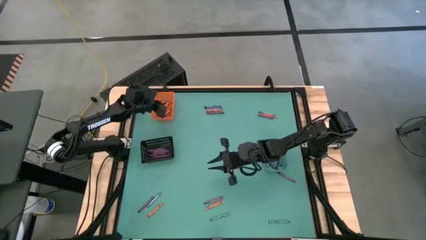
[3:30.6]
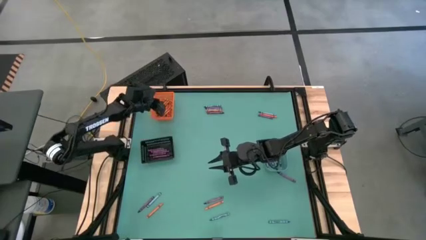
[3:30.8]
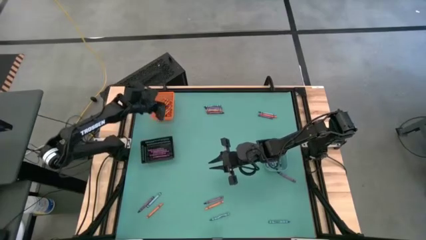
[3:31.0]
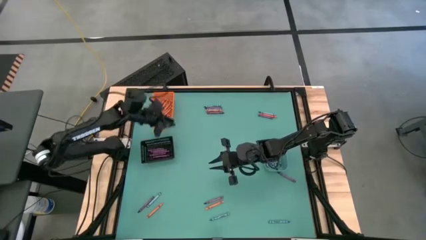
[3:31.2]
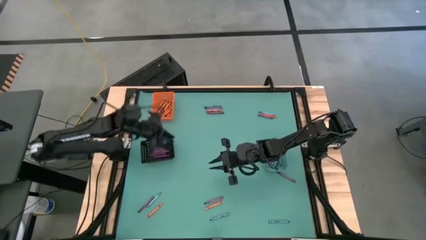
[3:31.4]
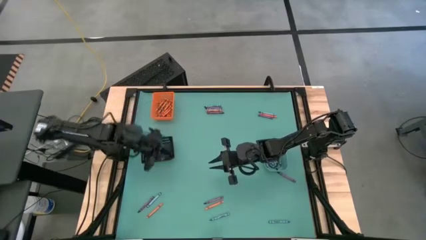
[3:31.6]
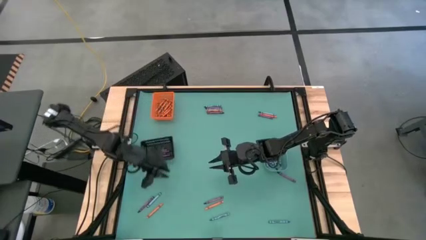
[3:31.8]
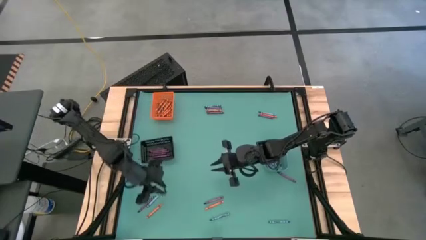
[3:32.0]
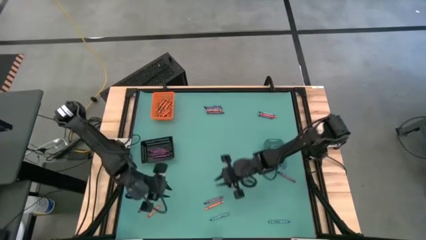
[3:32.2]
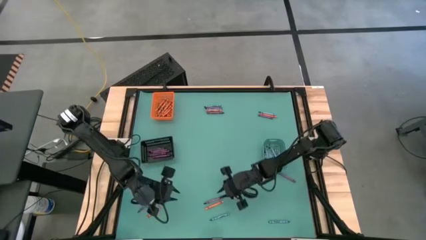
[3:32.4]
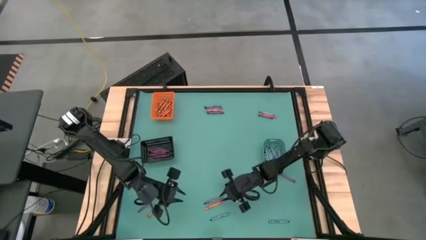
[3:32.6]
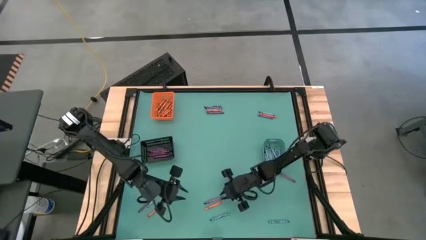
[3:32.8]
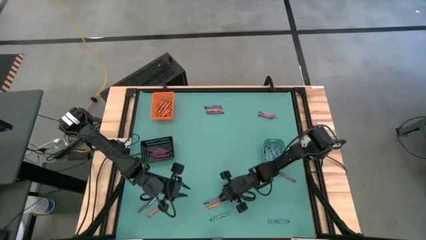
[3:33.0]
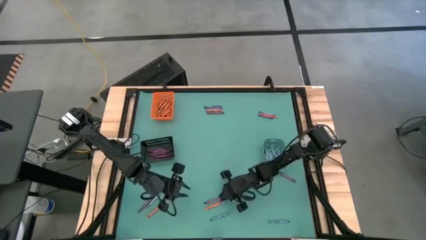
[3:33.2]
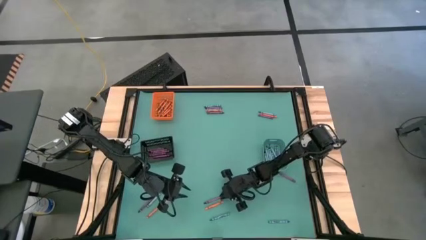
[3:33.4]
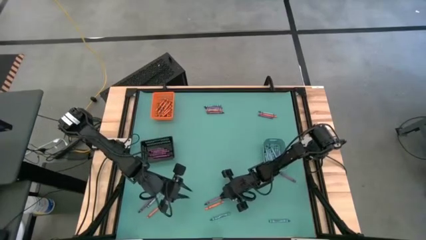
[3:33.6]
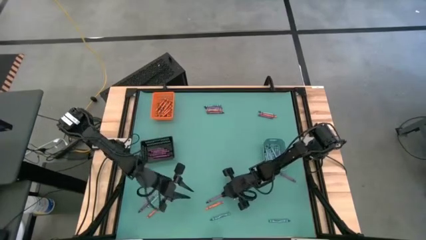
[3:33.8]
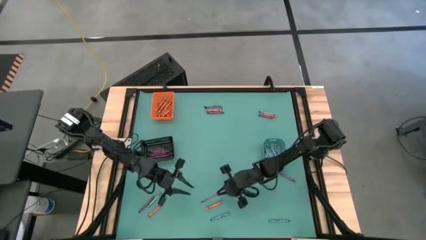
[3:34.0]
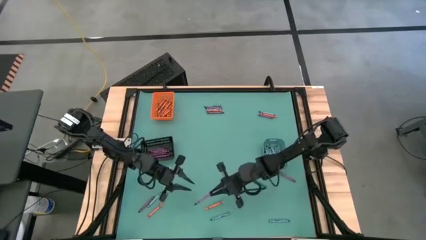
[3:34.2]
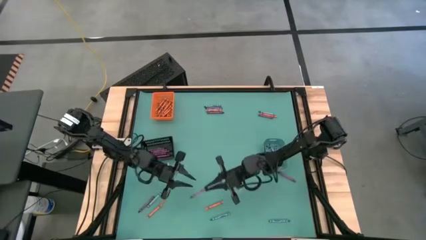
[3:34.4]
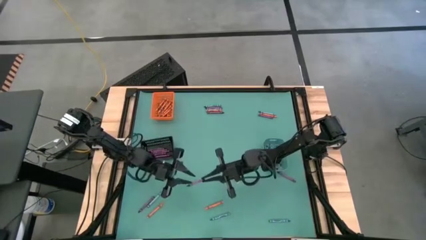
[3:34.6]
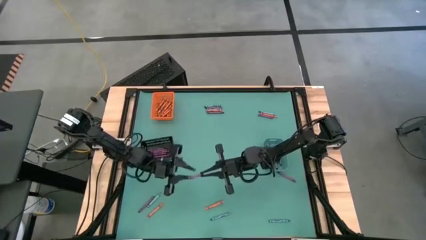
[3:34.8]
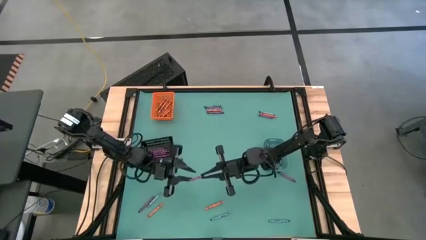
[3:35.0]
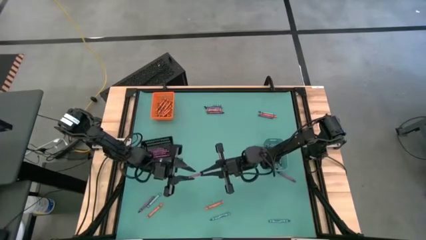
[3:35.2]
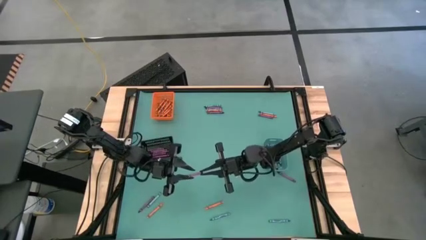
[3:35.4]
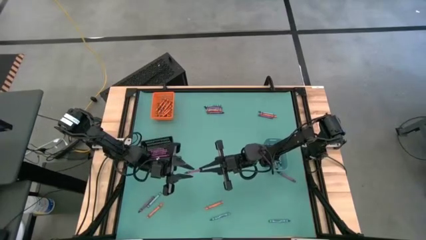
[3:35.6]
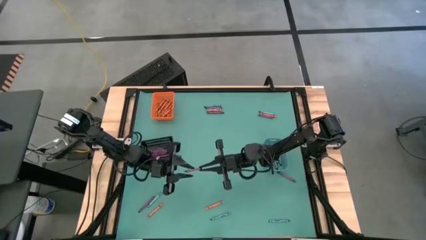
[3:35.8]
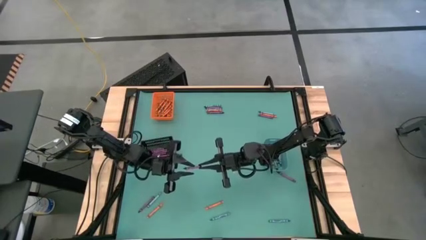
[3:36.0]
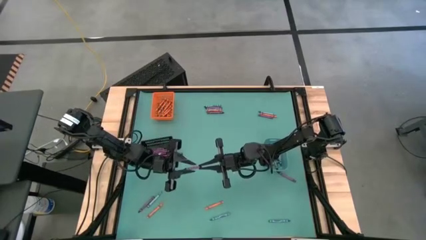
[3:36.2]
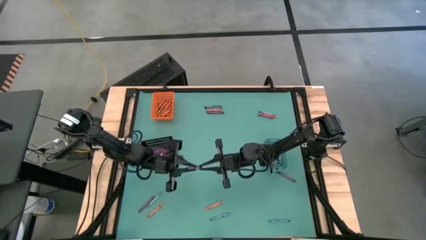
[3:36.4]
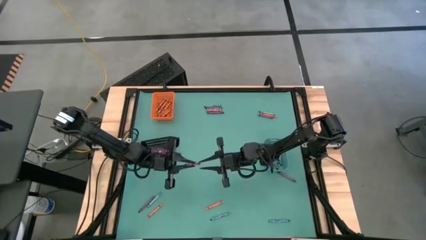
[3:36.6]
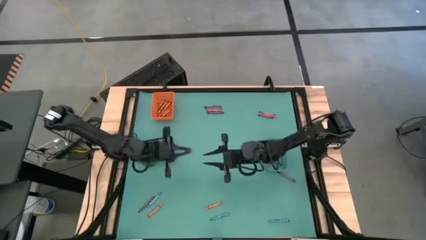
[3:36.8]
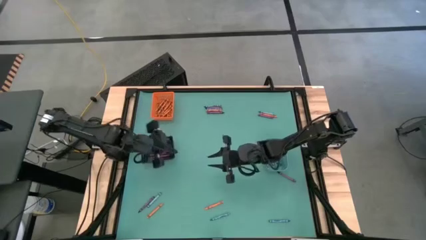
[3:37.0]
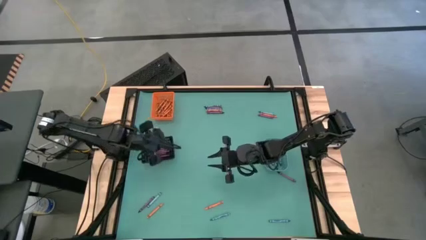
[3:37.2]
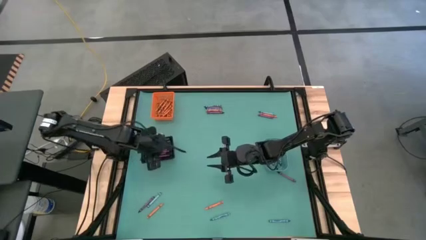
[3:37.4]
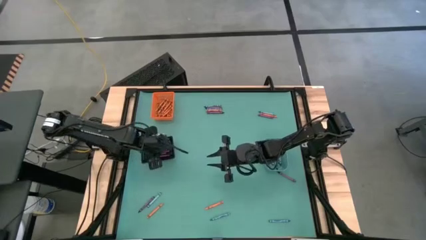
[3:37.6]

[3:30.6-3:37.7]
Task: Sort crayons
Put the violet crayon into the black bin

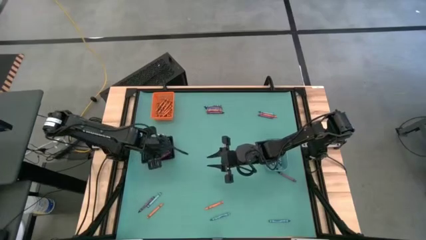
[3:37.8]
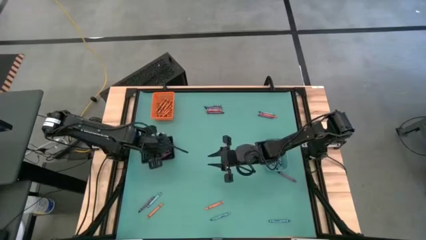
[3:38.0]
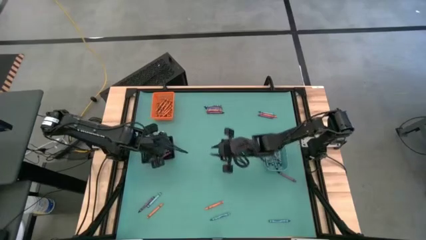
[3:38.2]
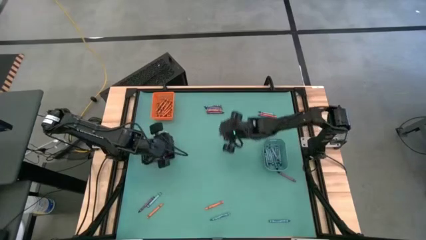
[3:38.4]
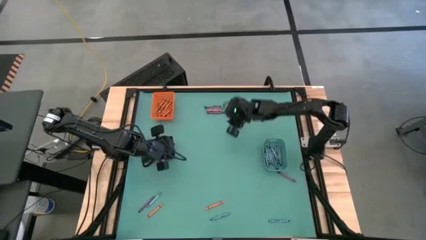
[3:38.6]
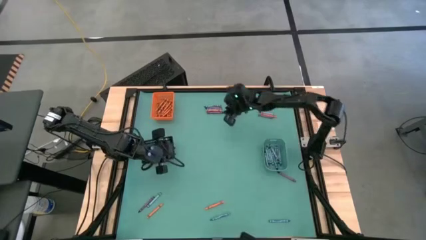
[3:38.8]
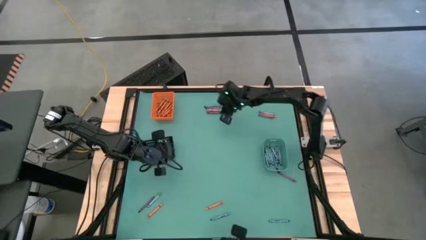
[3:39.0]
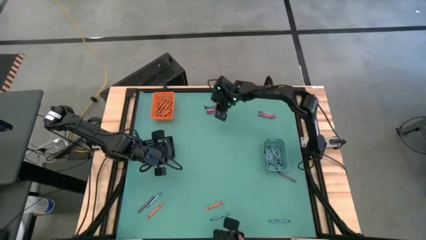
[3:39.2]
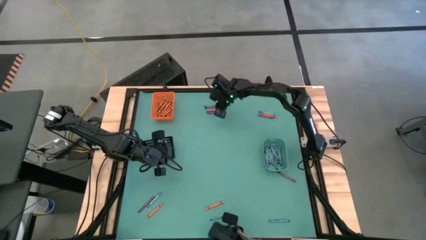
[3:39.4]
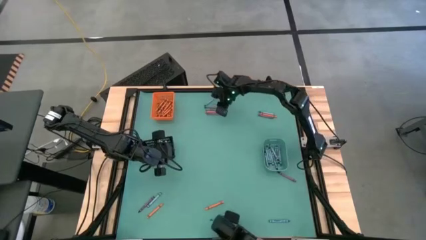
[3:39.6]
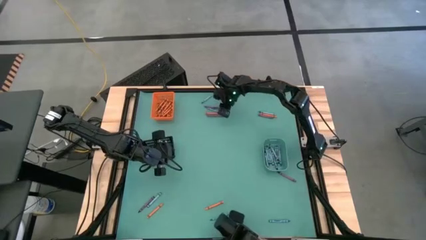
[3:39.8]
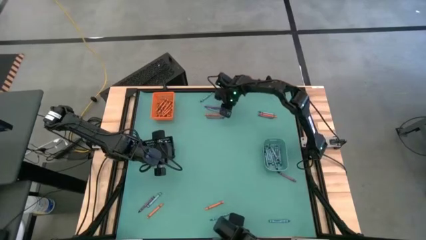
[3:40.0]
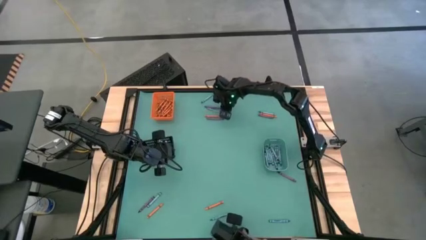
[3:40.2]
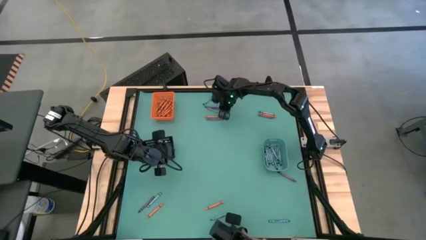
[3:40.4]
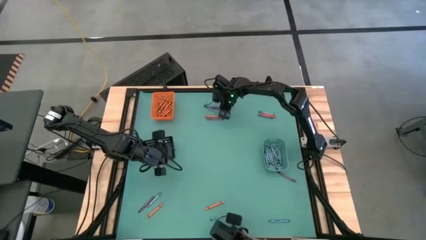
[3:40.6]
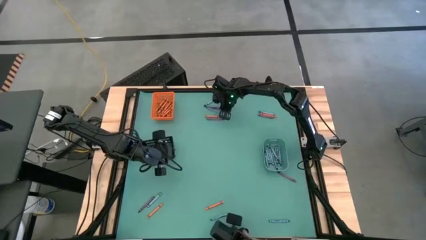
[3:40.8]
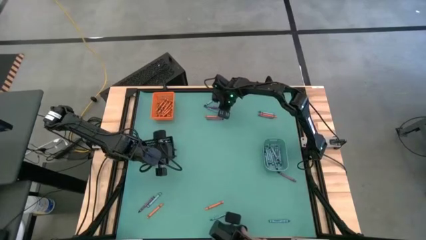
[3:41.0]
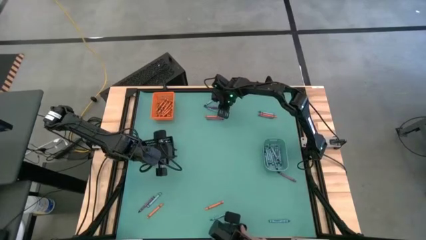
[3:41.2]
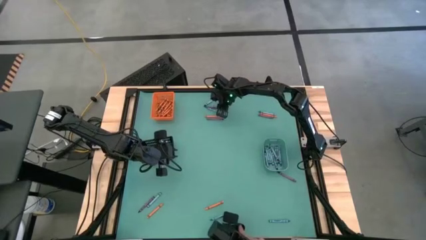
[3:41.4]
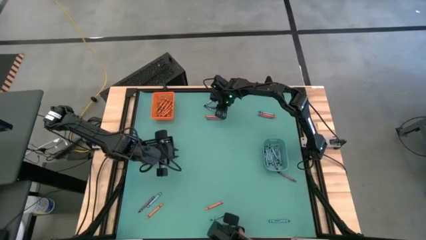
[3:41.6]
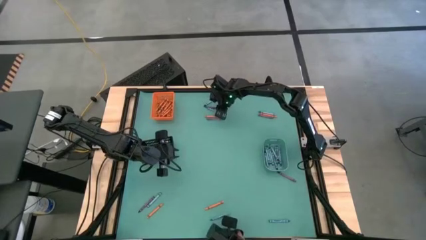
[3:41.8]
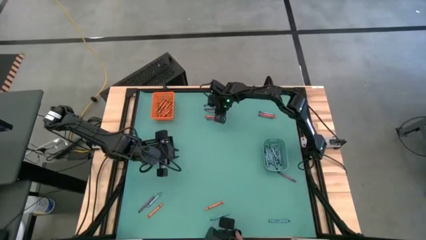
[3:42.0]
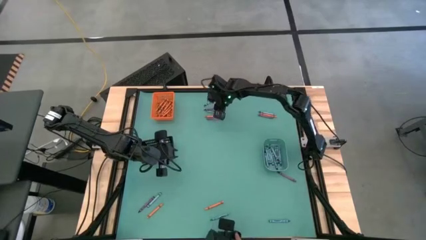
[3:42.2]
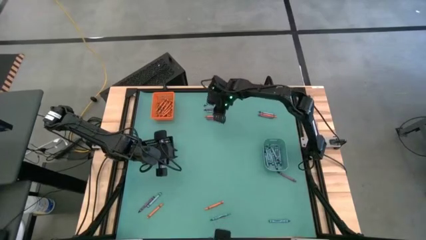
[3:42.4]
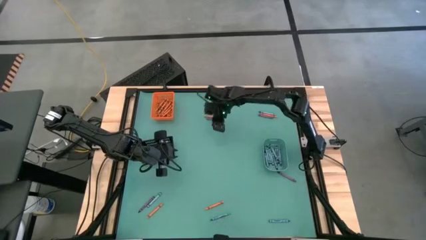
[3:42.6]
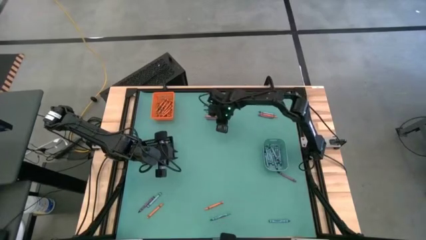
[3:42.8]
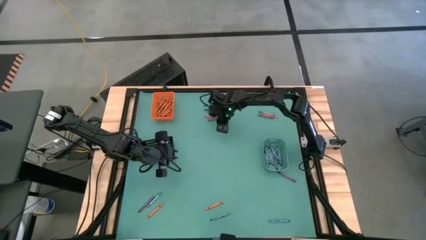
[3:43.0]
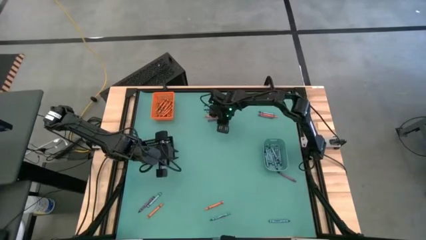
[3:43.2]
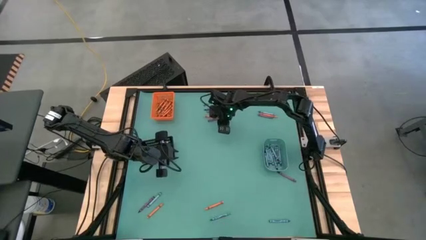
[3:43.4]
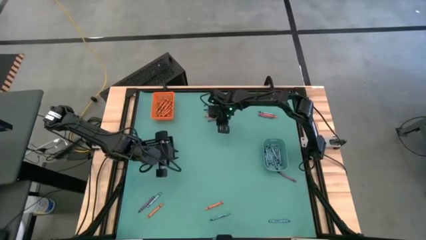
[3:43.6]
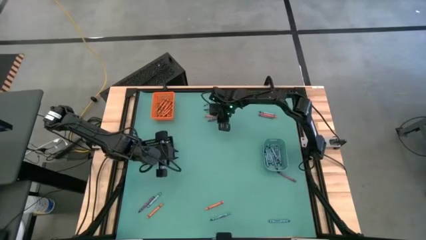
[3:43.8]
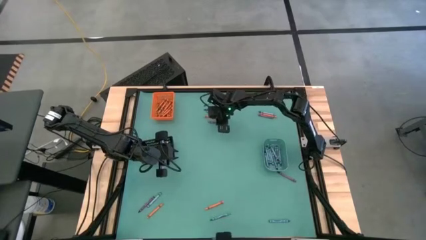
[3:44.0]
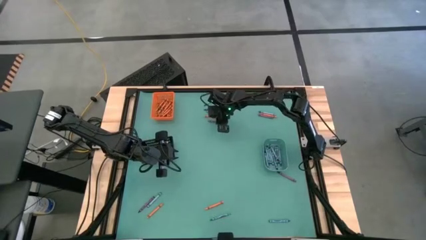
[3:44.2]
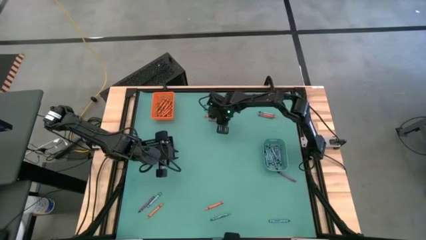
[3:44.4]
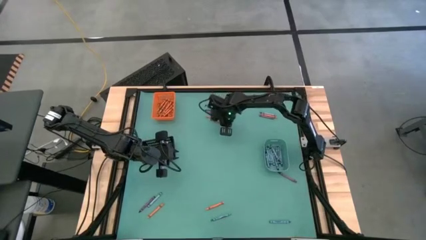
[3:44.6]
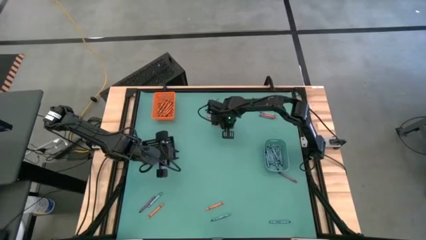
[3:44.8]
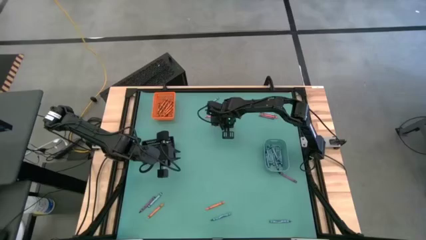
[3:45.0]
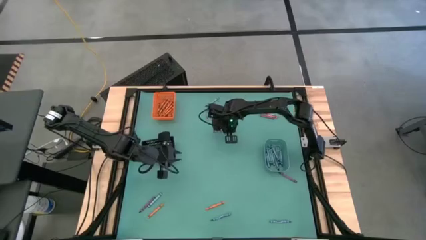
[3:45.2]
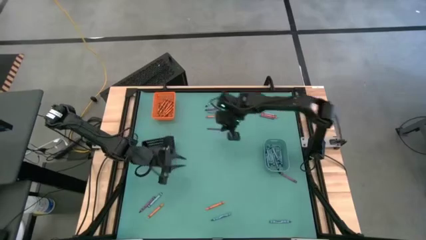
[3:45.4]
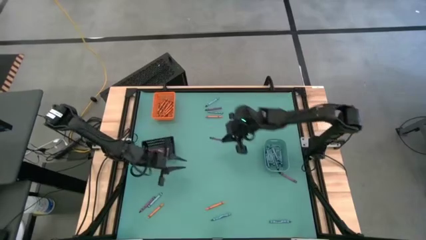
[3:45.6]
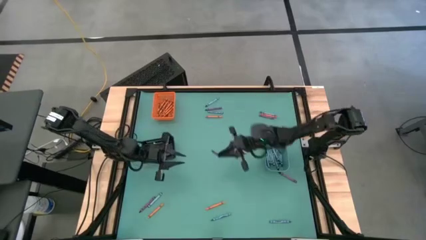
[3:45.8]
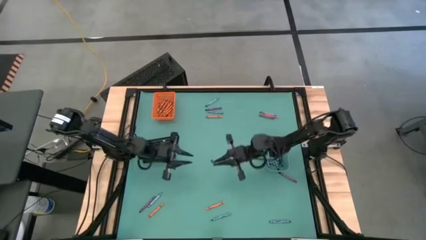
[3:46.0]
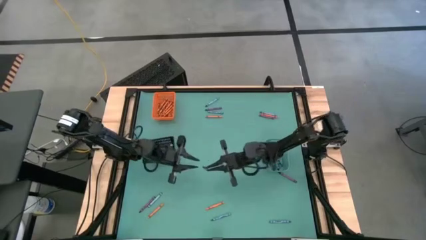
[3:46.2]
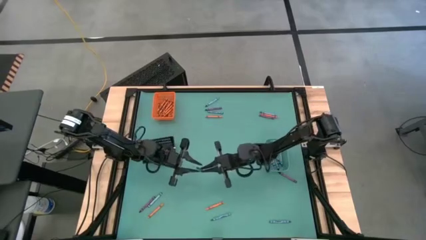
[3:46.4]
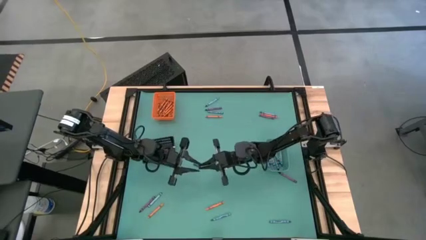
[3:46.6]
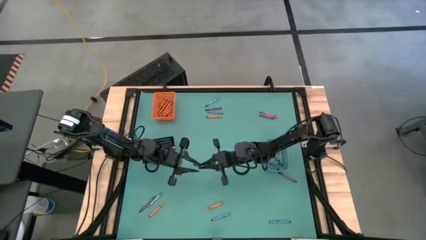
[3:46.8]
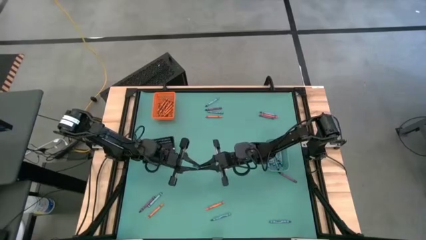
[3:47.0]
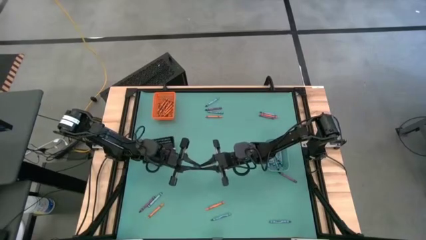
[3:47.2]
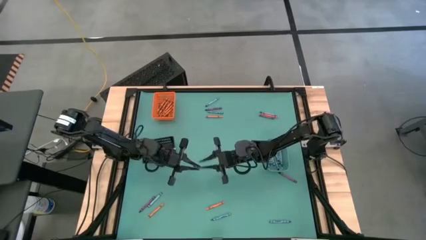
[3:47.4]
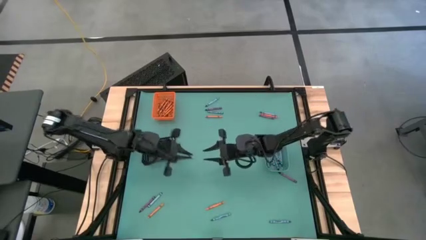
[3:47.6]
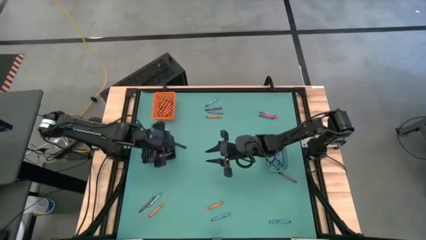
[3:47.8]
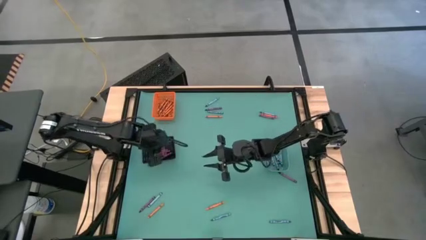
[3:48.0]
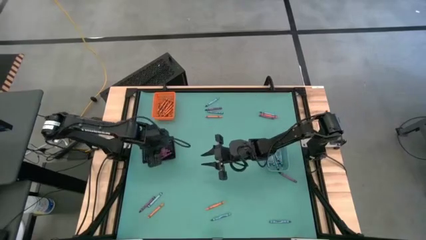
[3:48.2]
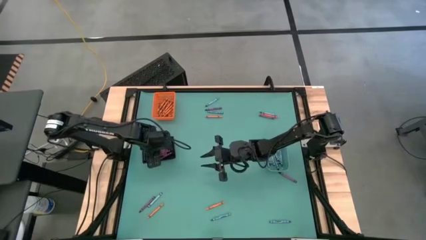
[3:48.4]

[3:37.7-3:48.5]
Put the violet crayon into the black bin
